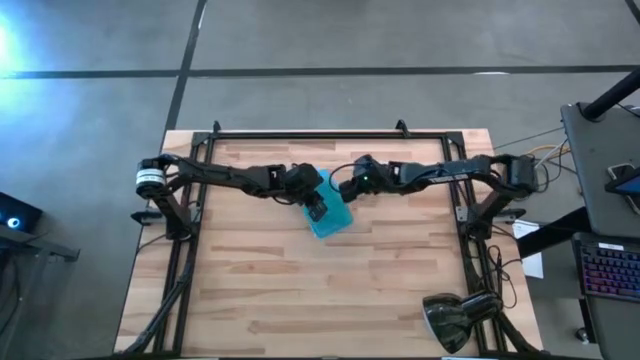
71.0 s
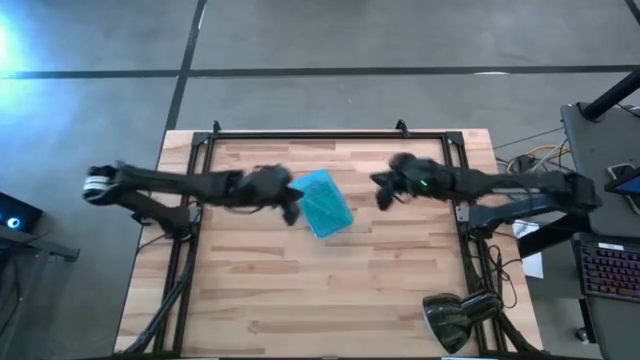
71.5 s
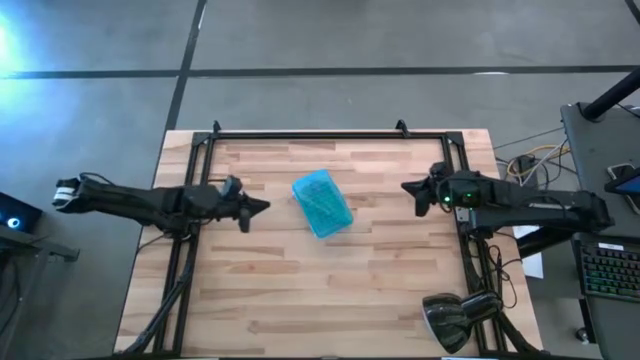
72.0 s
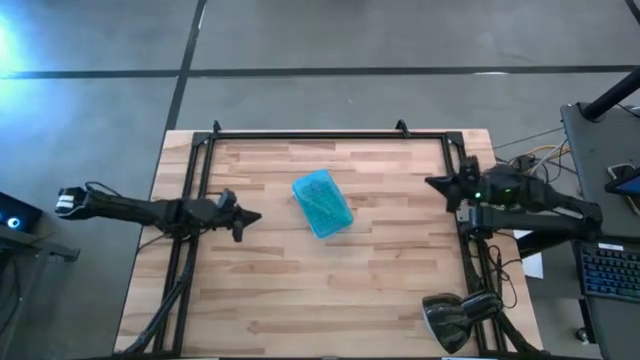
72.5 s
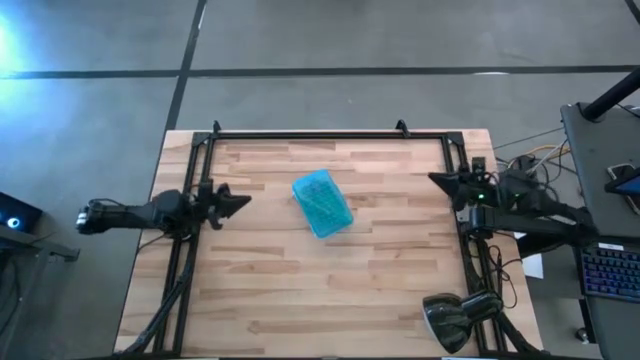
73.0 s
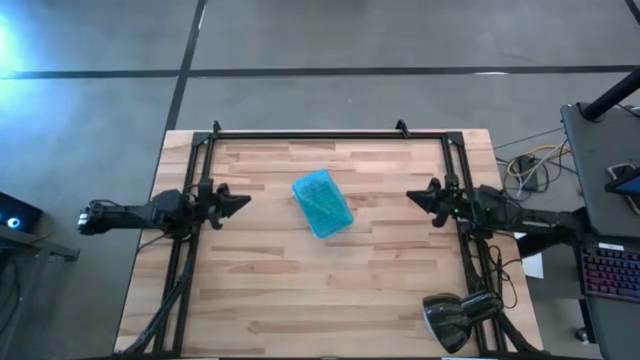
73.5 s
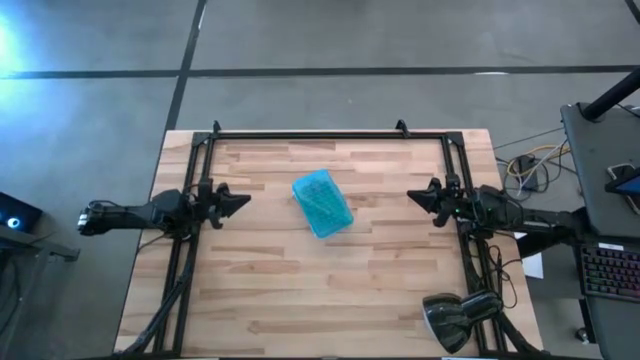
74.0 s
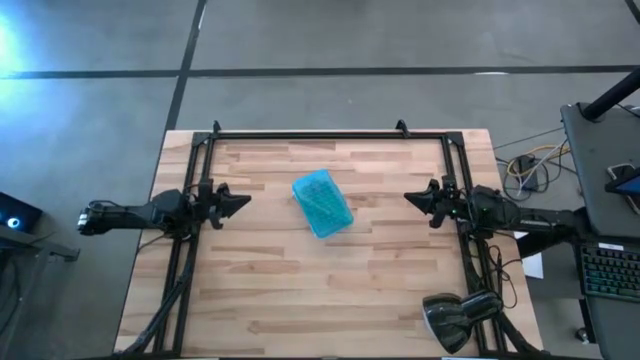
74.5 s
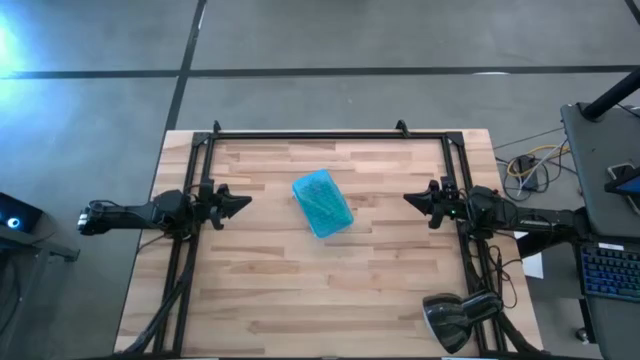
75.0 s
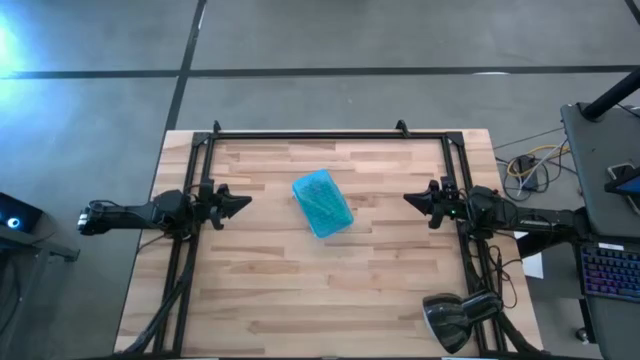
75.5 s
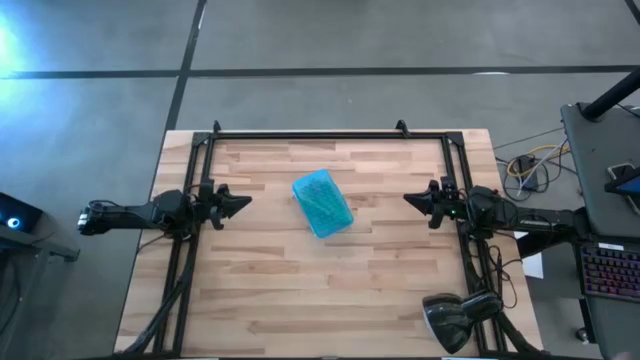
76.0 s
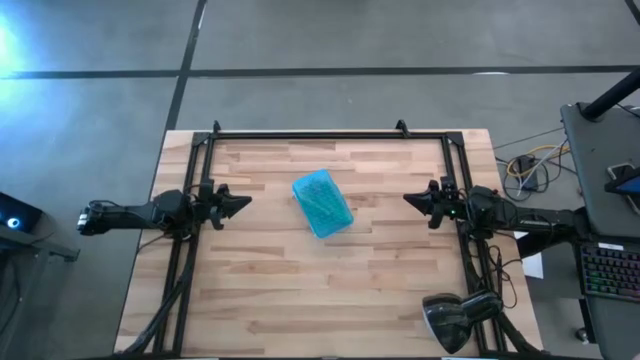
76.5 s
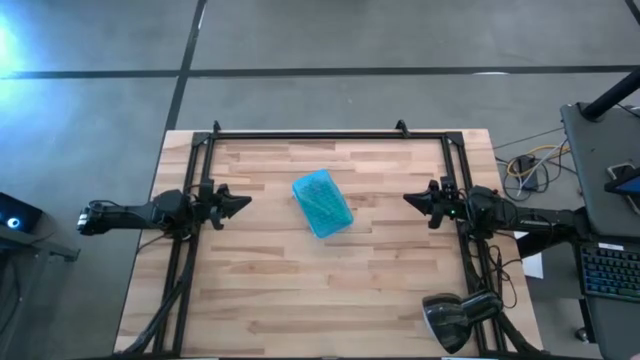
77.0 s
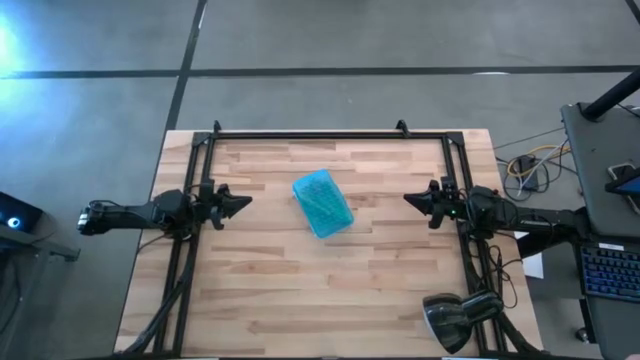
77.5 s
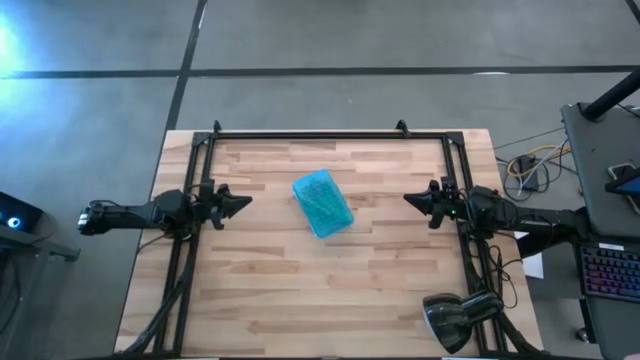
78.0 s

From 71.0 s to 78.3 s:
Task: Pick & place school supplies into a supply box
Return to Home Position

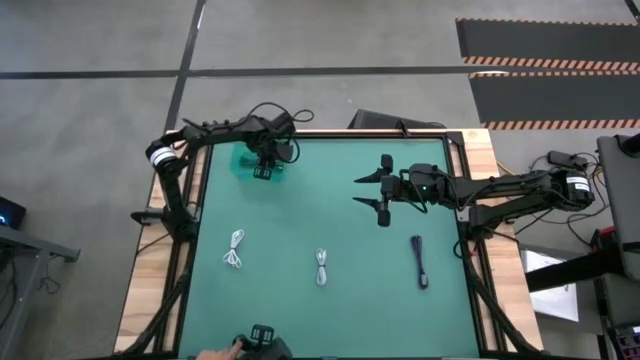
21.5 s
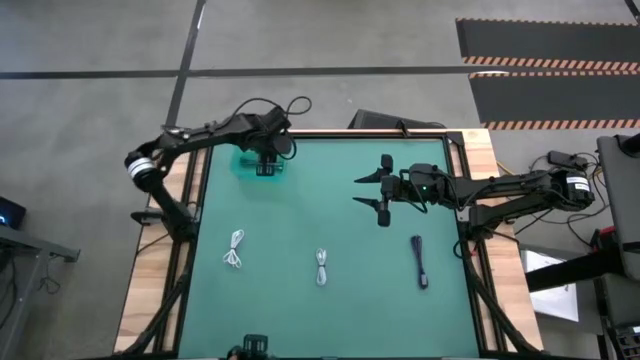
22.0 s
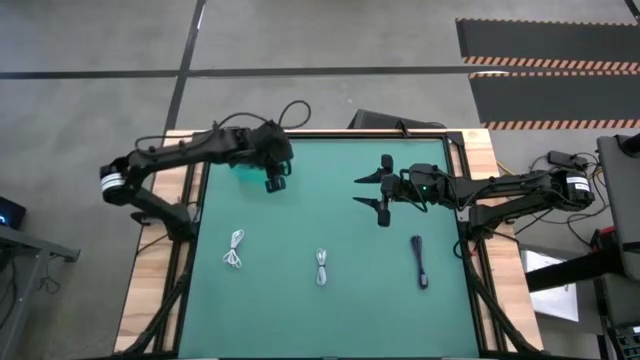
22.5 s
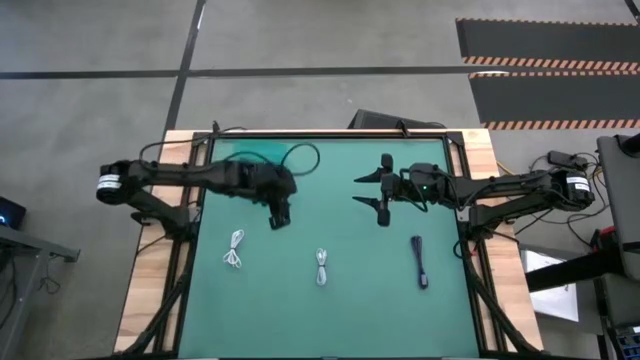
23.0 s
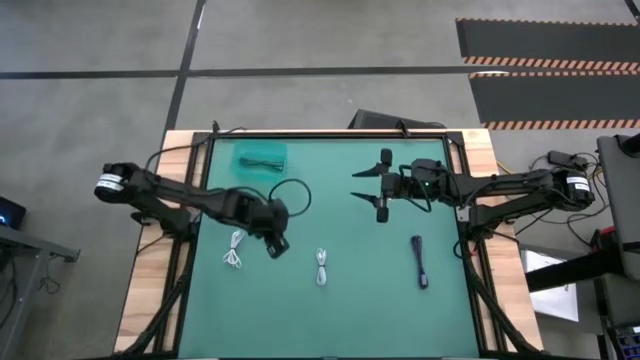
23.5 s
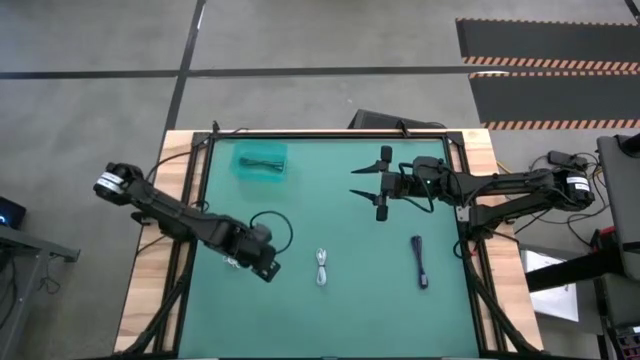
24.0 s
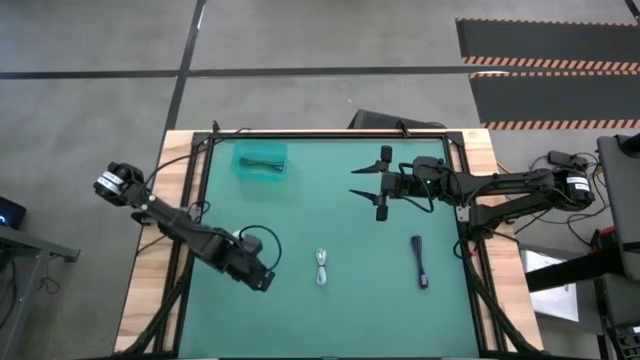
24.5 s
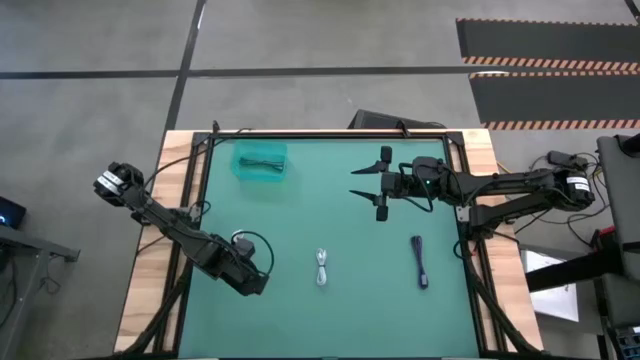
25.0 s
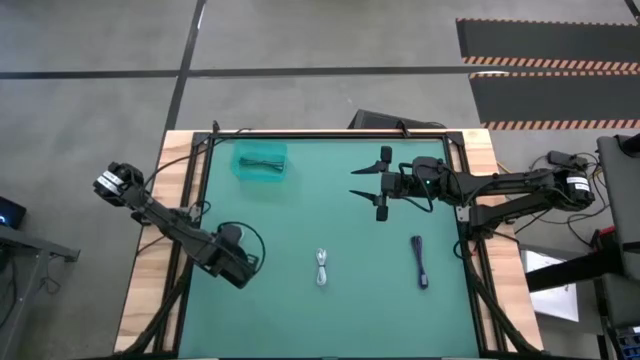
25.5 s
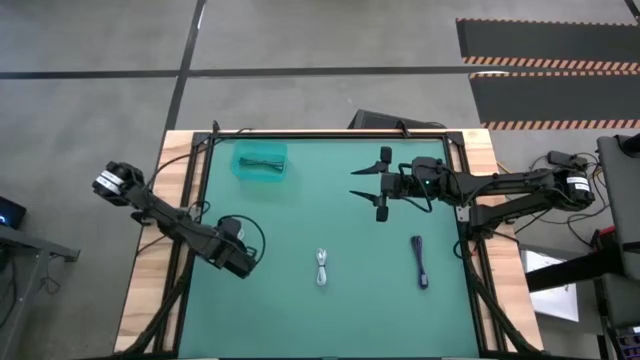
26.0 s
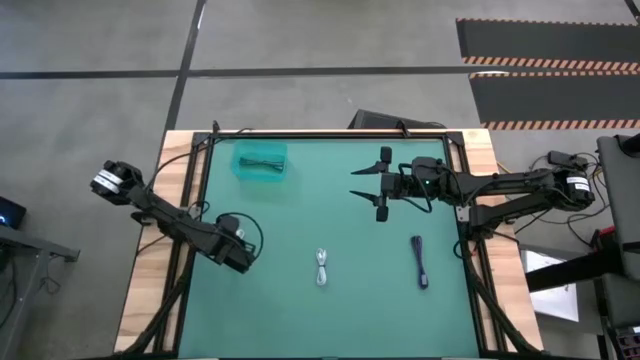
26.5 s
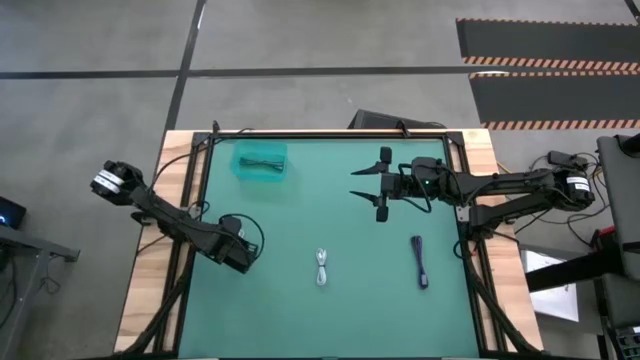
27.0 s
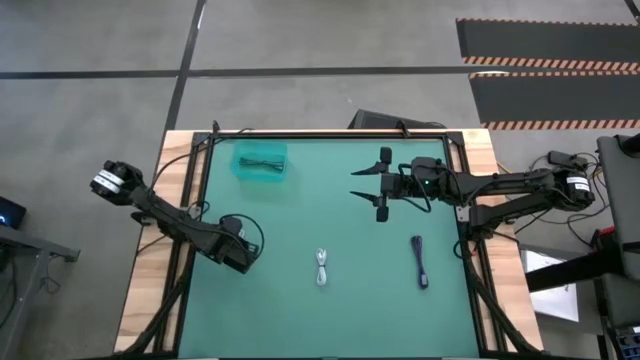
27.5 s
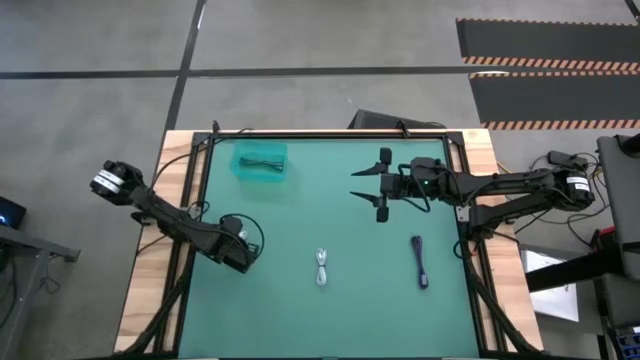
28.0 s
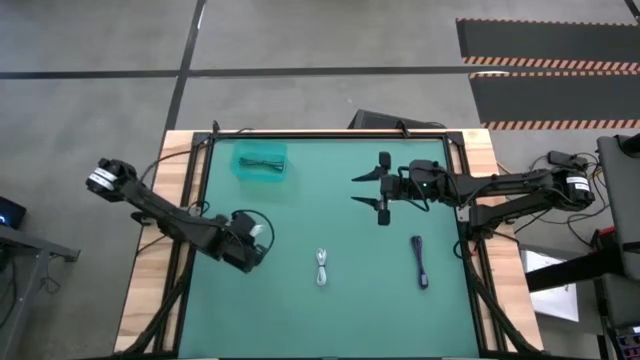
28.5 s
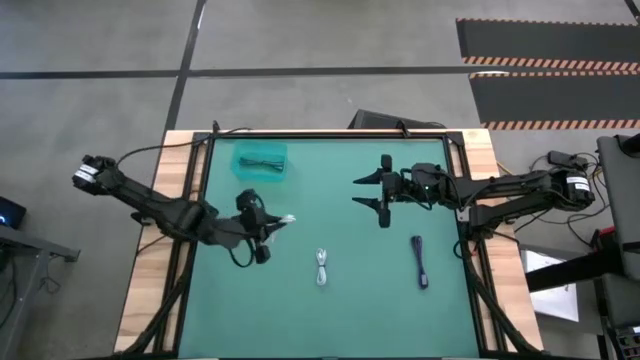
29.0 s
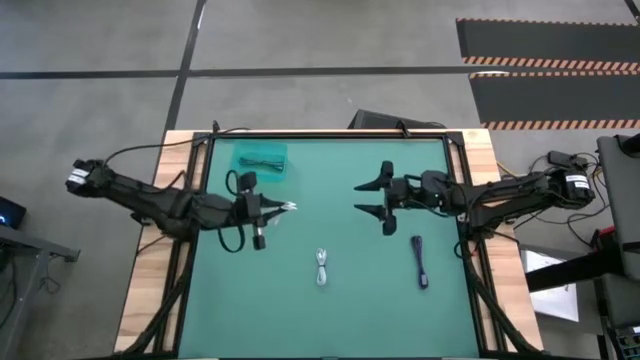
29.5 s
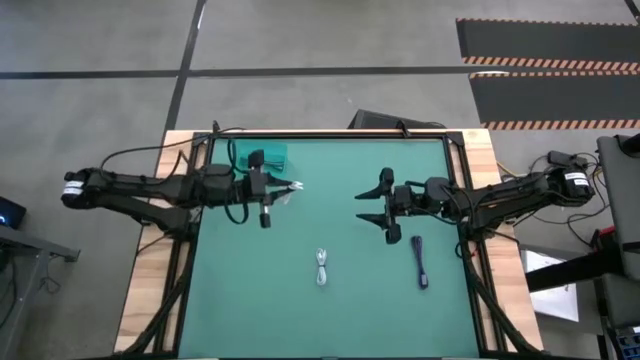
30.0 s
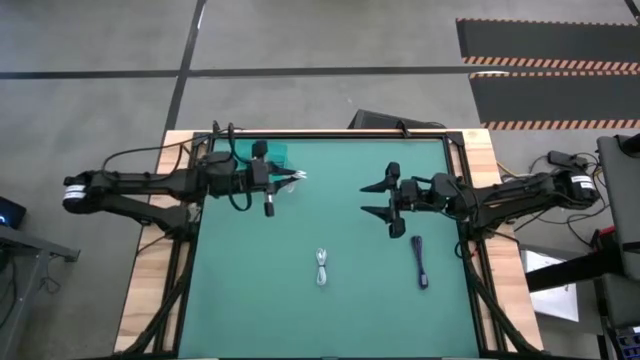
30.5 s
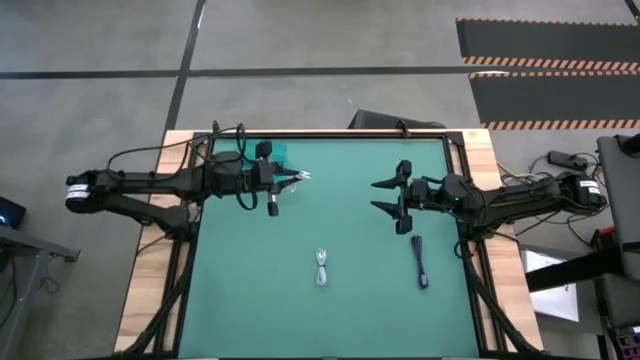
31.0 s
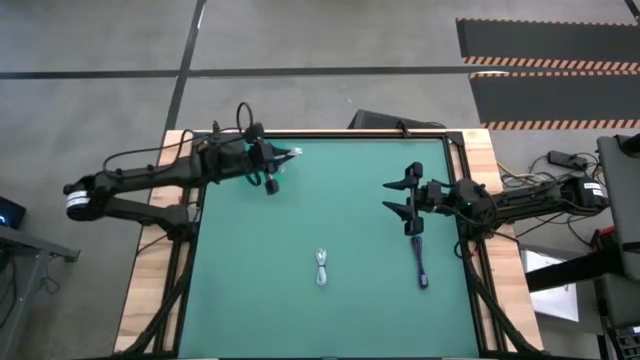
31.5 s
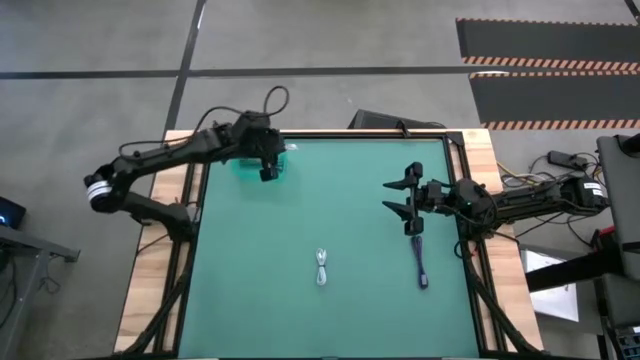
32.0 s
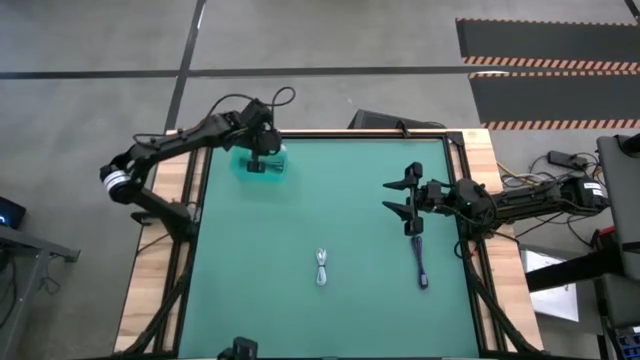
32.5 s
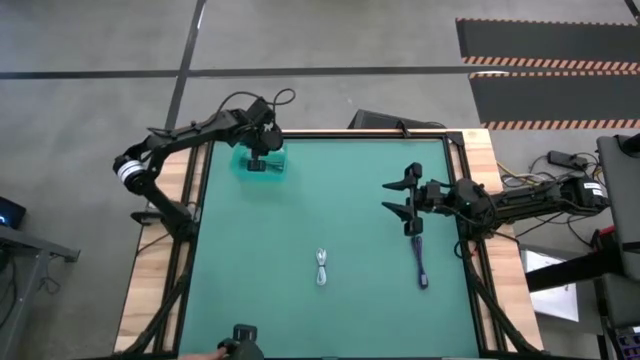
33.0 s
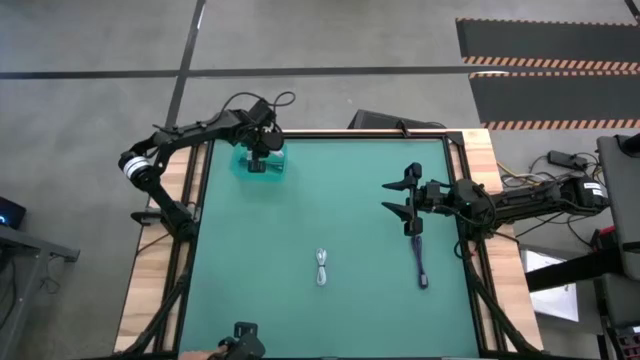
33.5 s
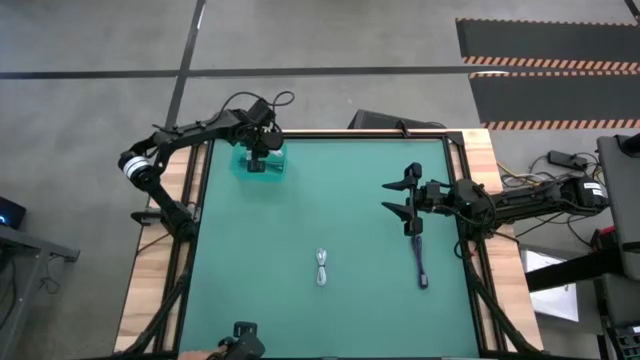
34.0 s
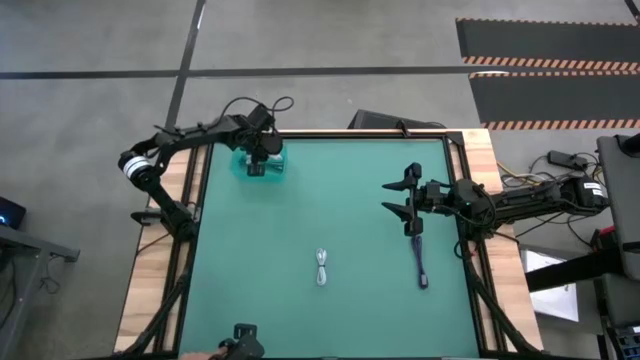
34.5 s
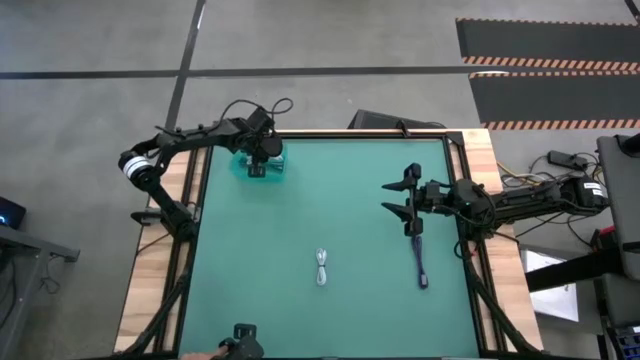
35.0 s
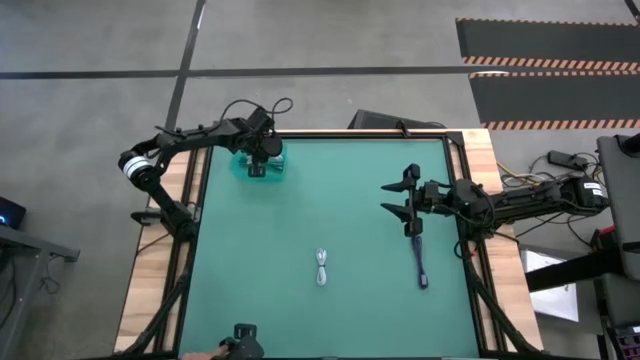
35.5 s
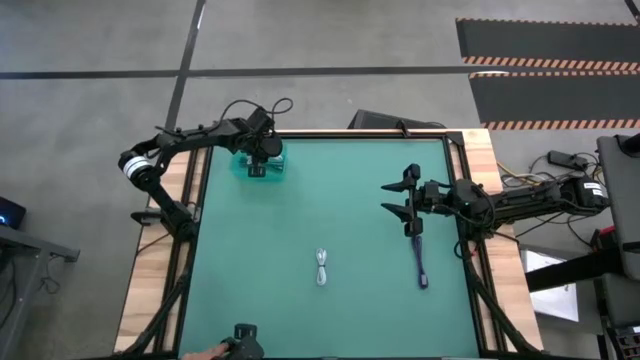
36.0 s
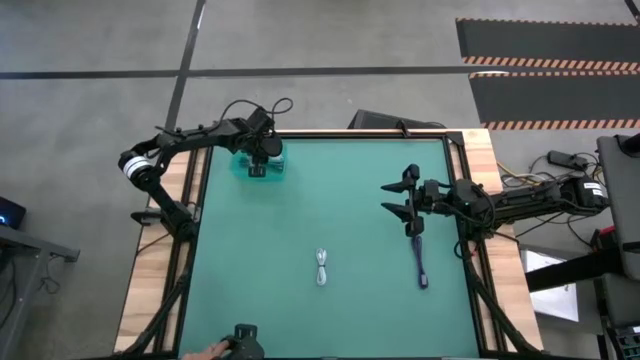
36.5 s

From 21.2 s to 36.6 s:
Task: Pick and place USB-C Cables
Put the left white USB cable into the blue bin
